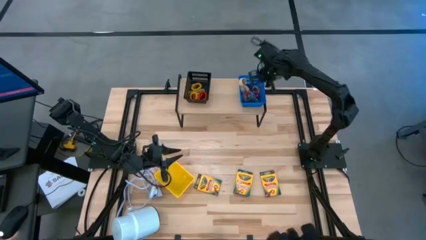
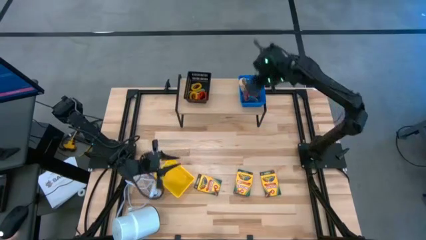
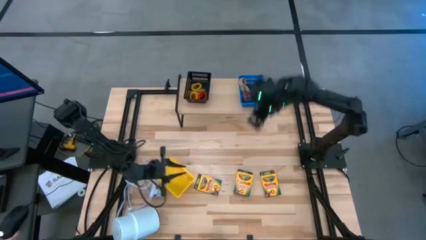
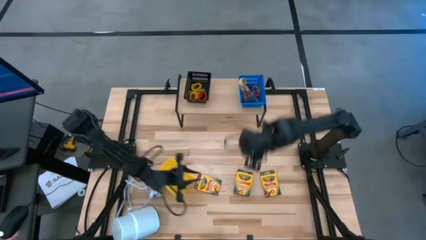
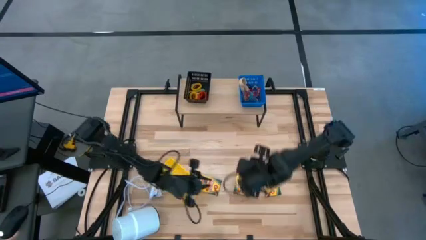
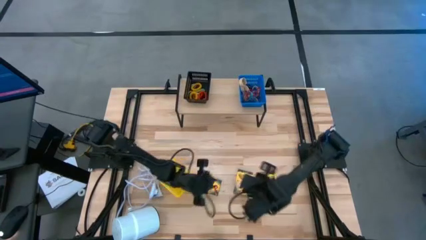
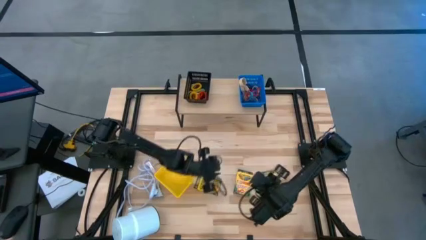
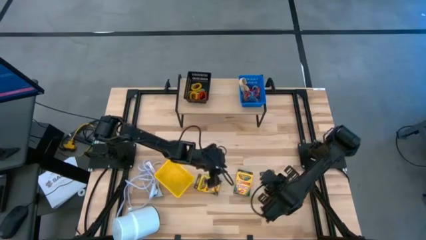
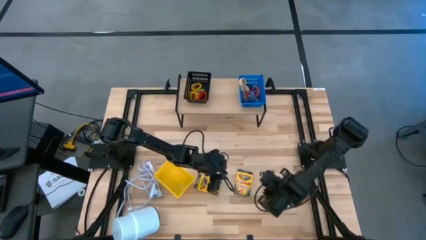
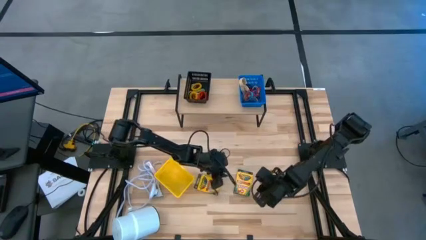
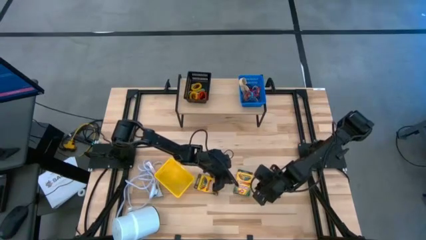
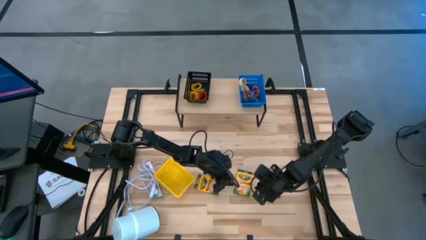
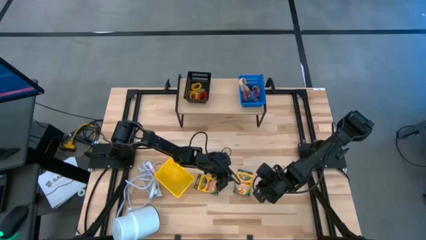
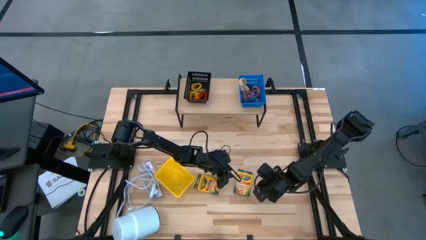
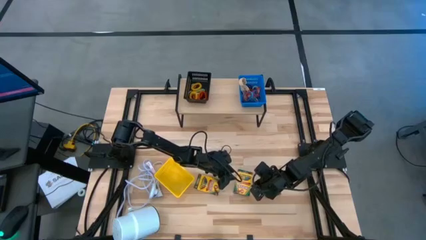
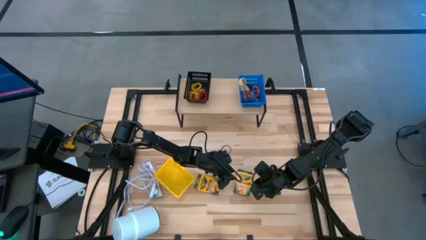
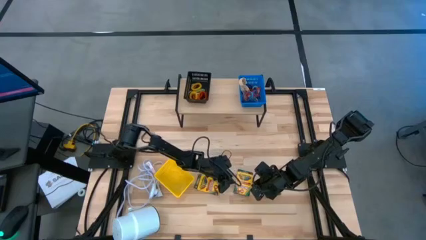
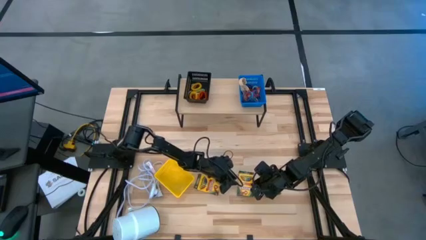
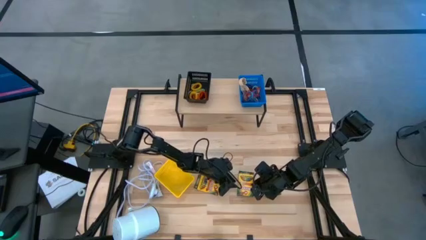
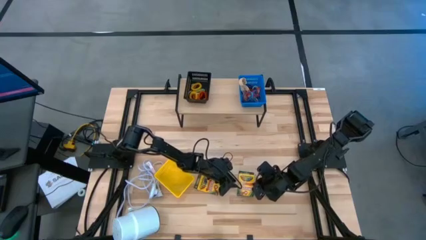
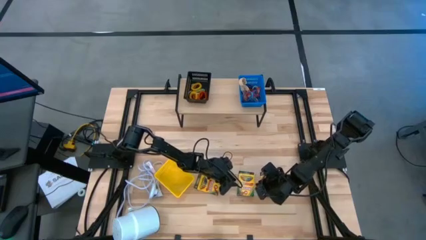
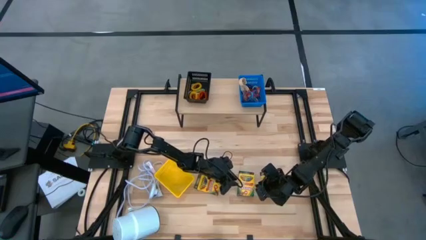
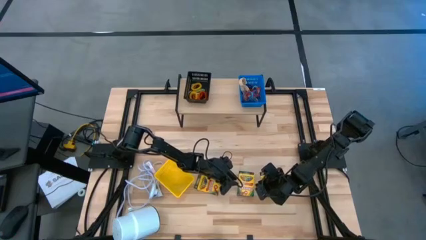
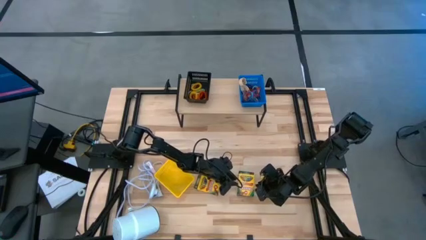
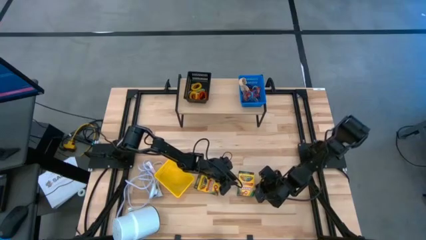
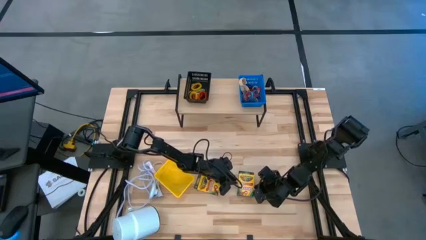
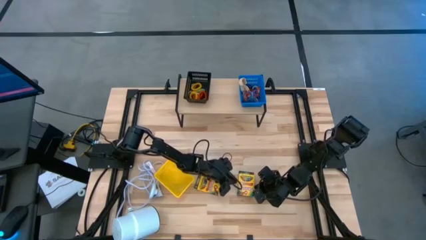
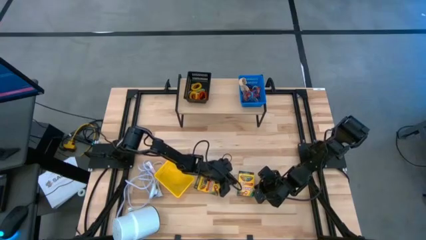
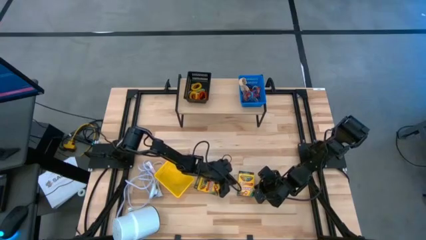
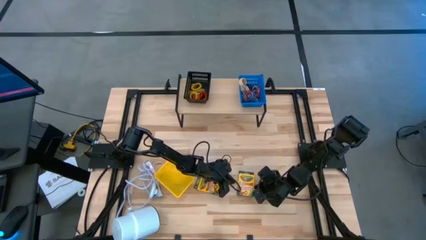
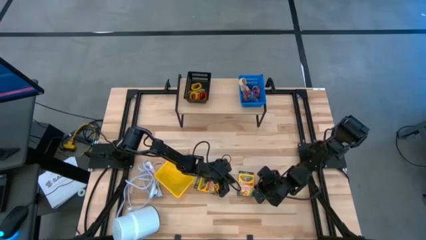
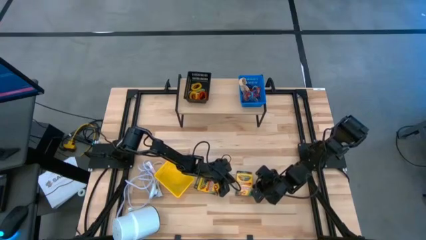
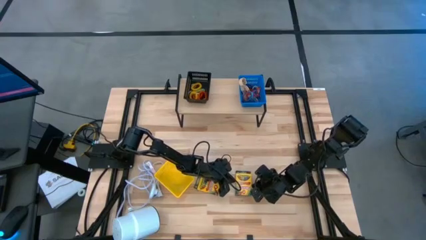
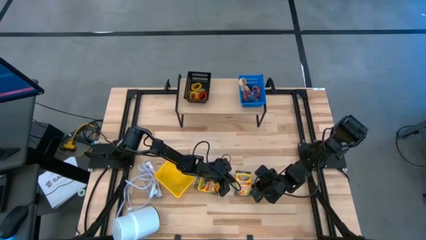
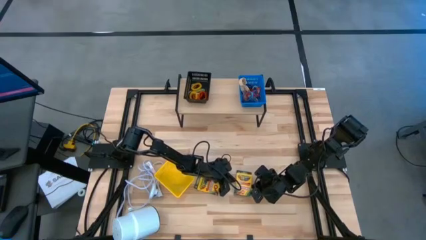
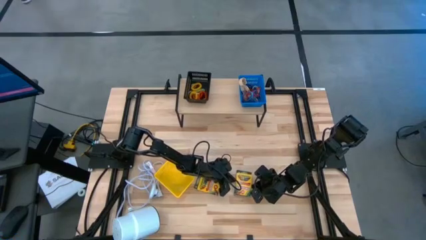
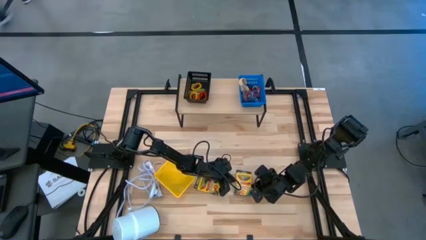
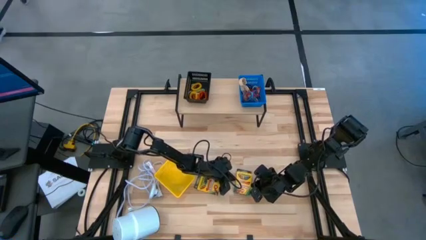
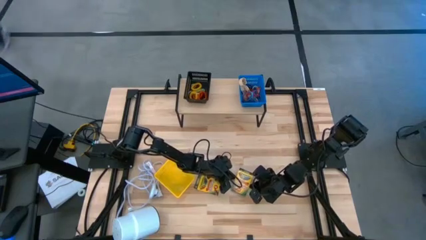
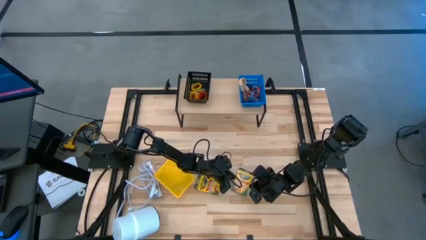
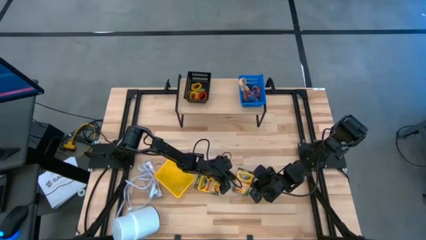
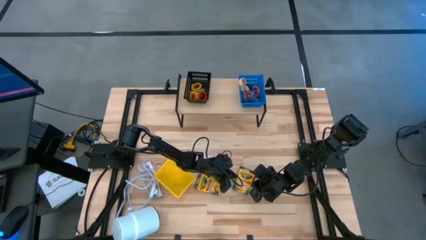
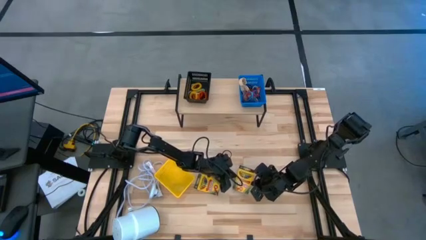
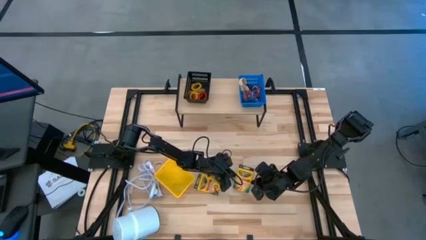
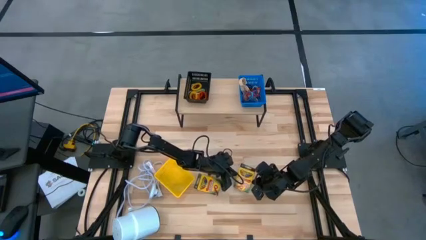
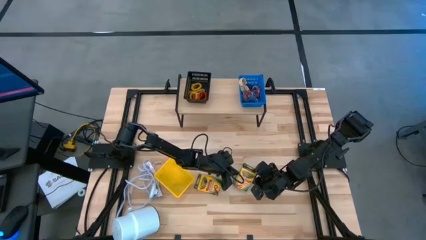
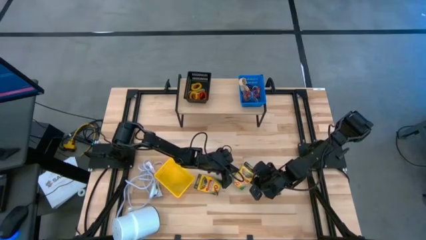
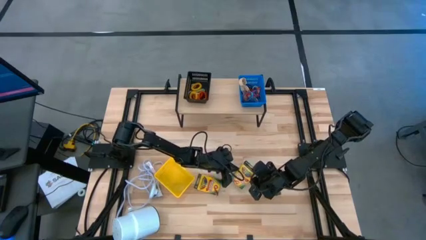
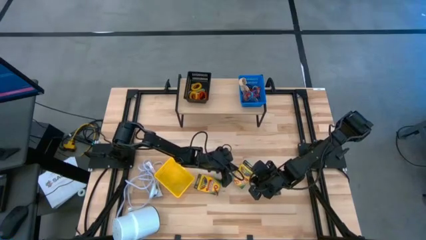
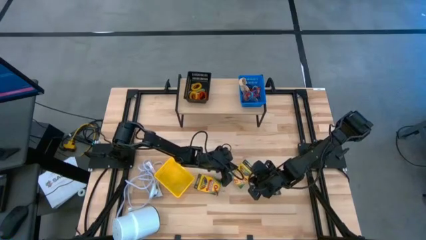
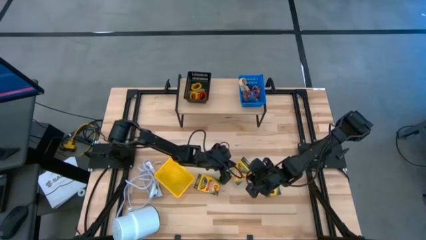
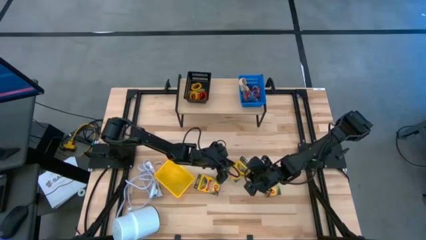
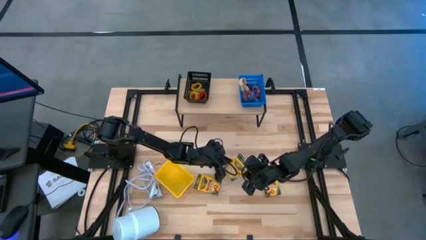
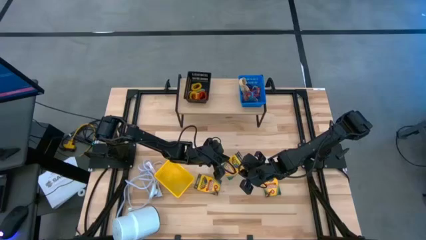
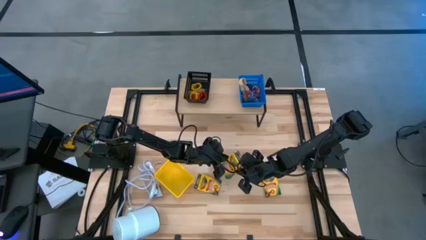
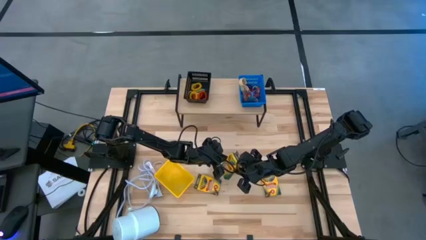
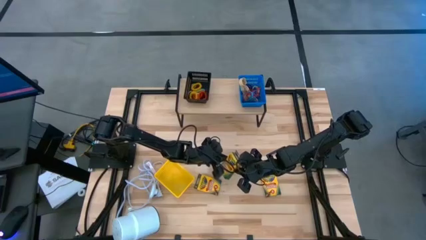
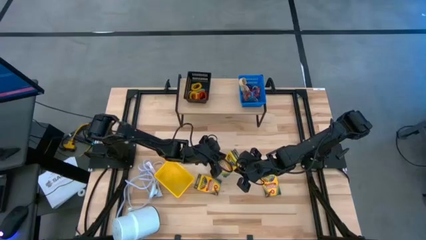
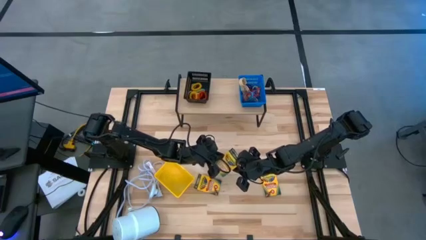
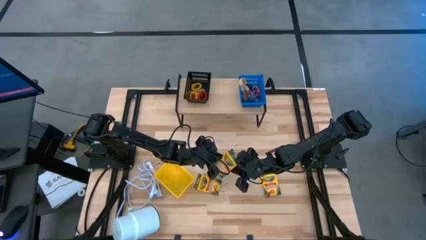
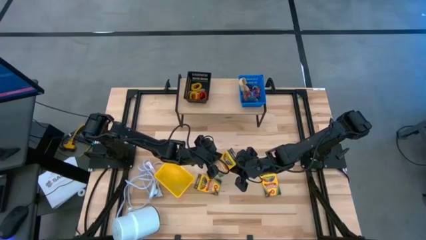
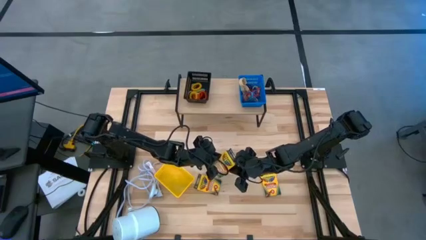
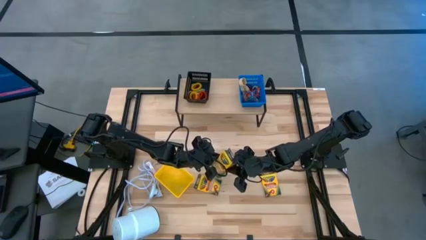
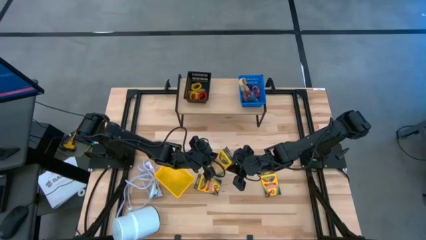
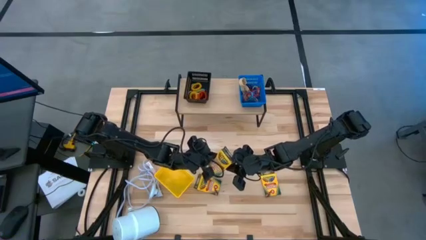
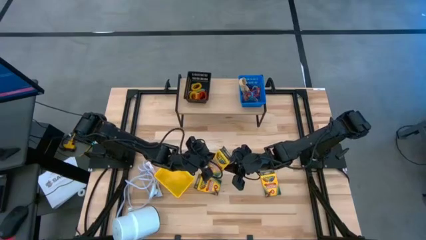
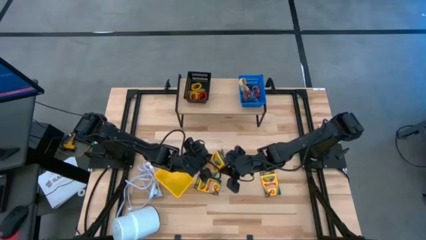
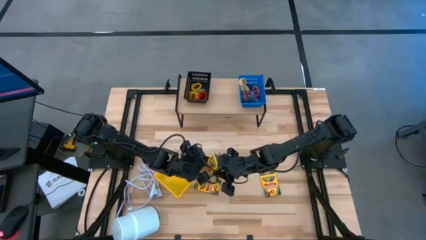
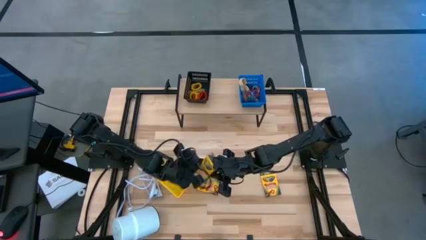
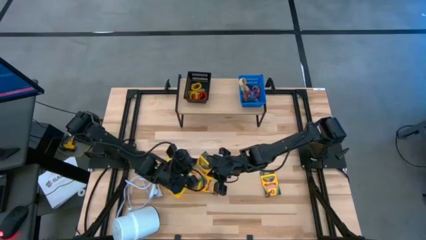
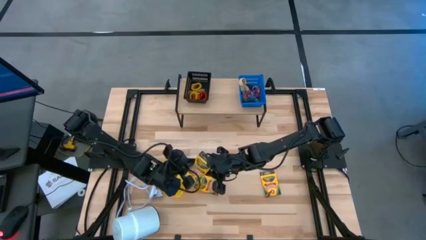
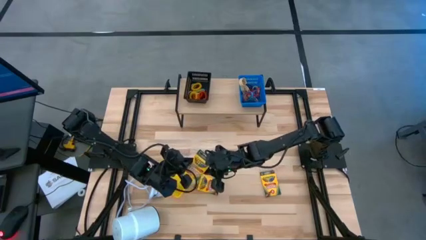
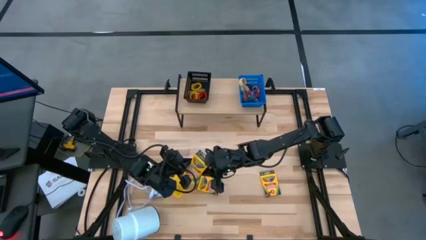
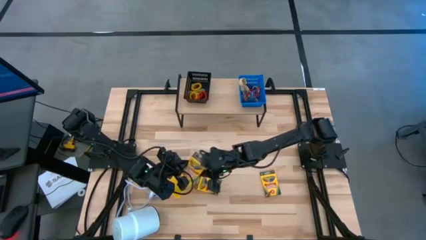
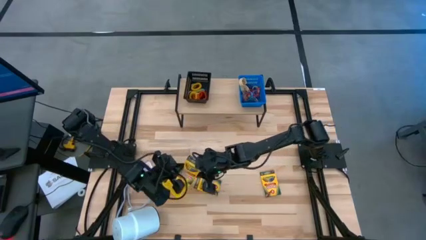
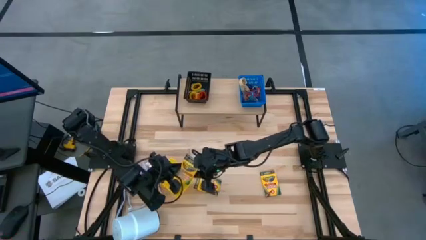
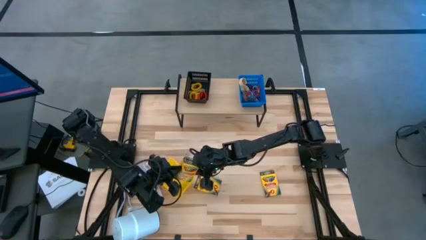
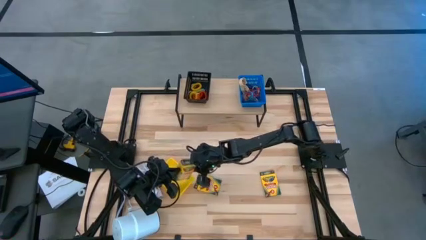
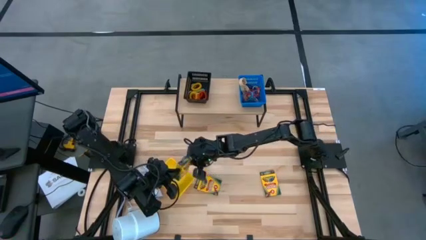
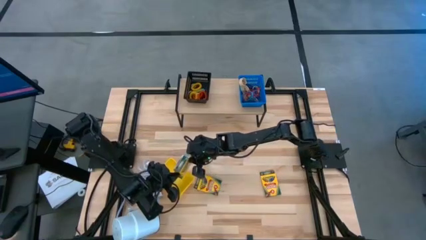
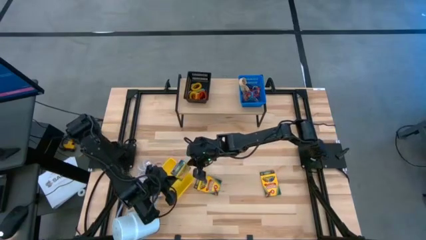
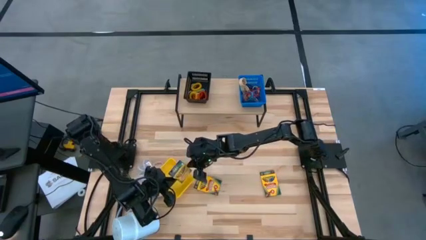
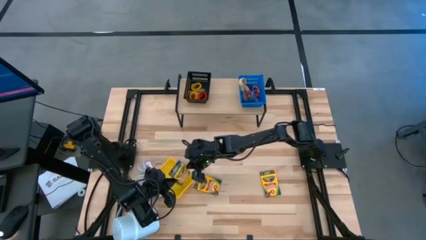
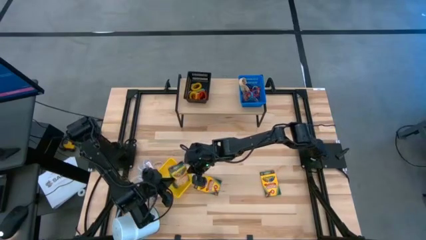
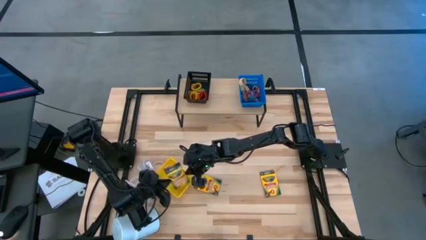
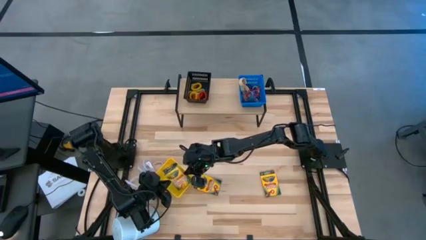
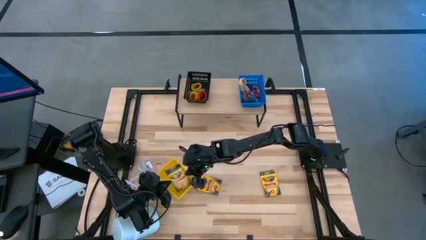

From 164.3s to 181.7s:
Task: Pick & Place Office Desk Supplies
Put the yellow crayon box into the yellow bin
